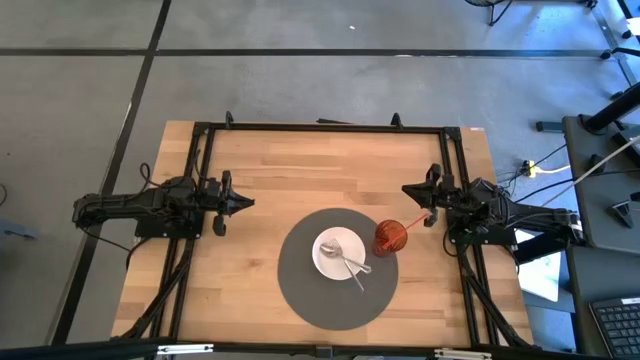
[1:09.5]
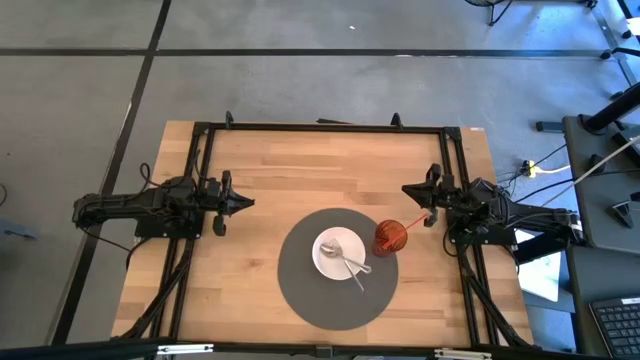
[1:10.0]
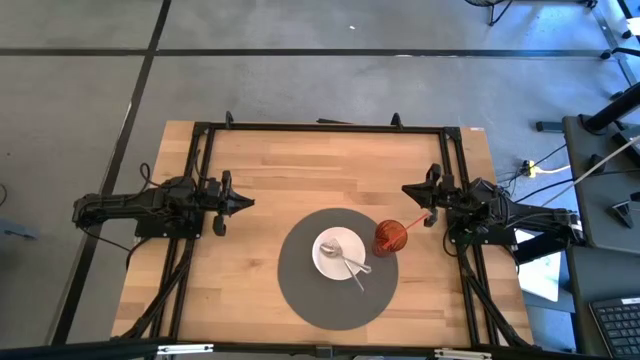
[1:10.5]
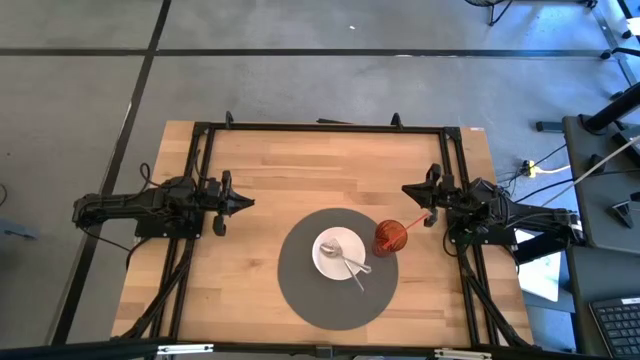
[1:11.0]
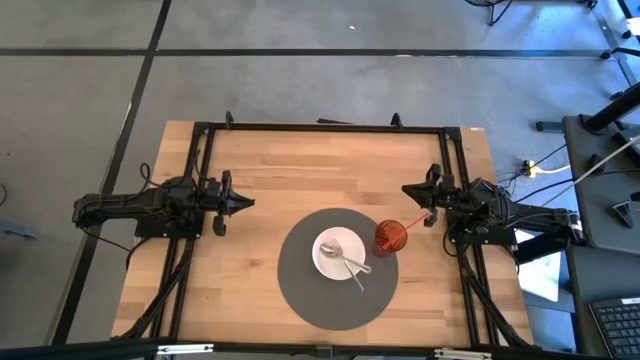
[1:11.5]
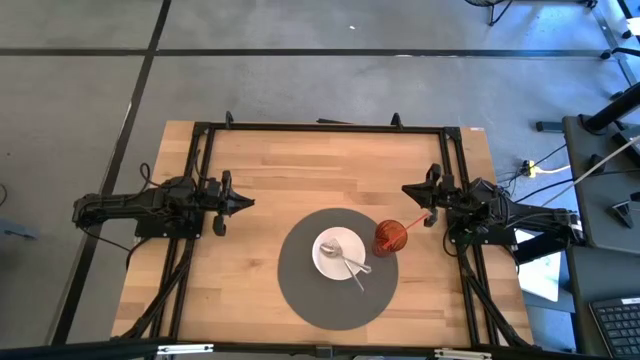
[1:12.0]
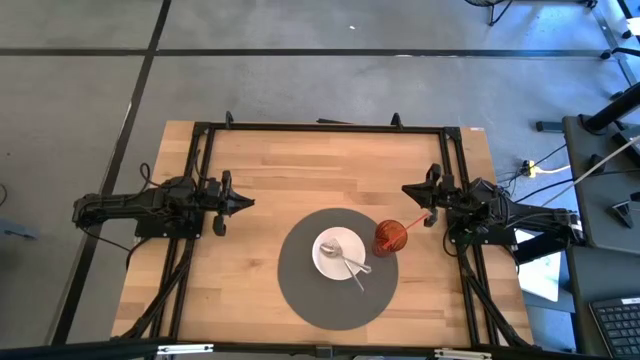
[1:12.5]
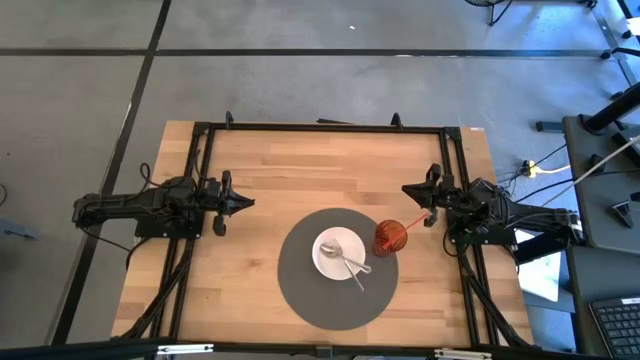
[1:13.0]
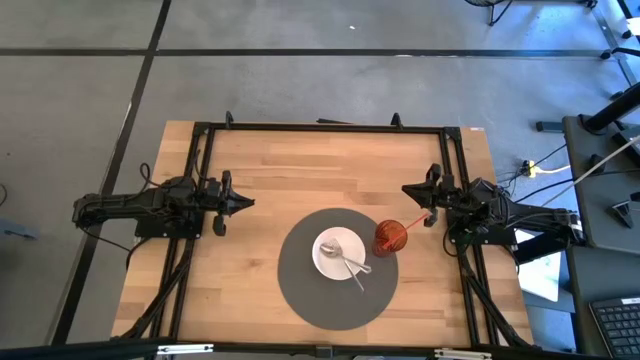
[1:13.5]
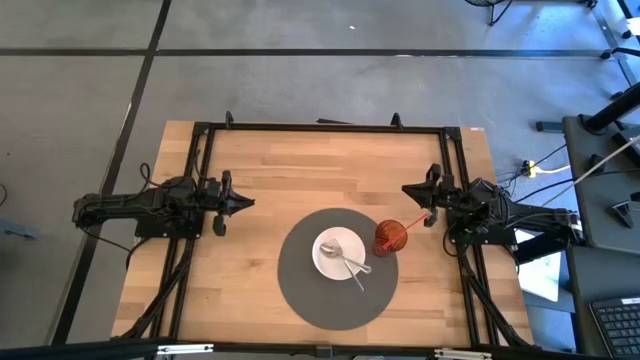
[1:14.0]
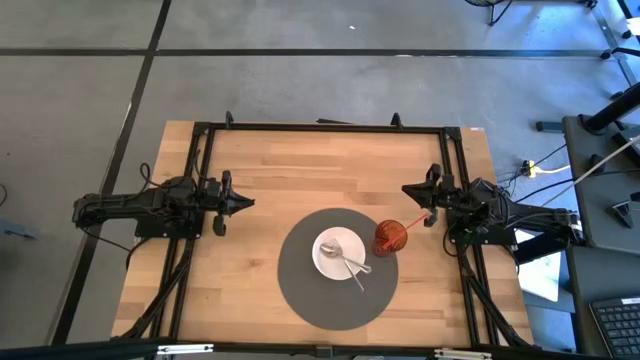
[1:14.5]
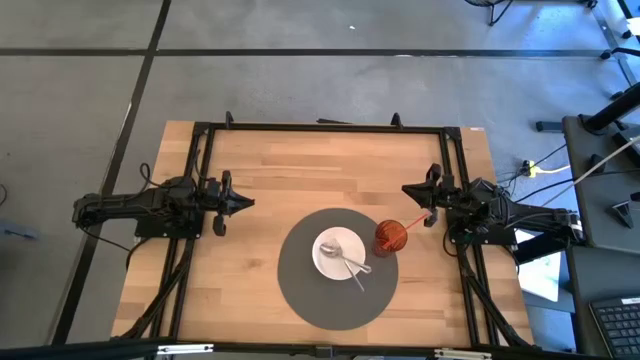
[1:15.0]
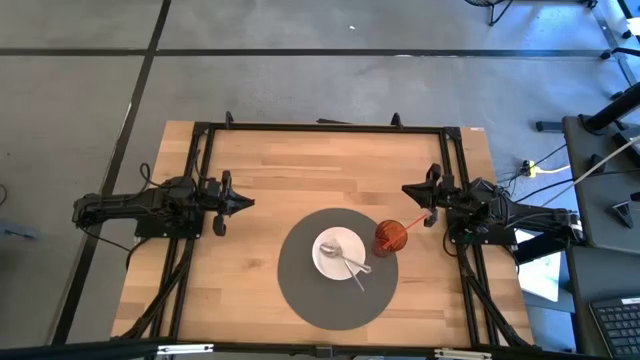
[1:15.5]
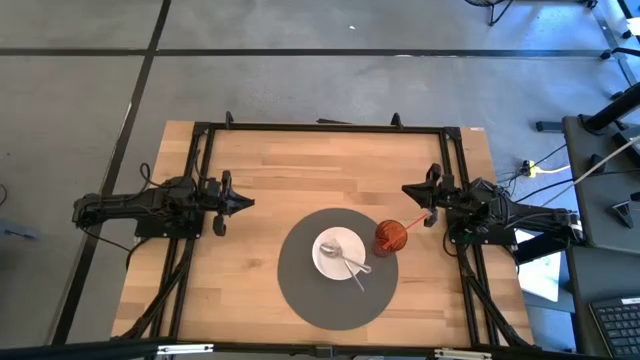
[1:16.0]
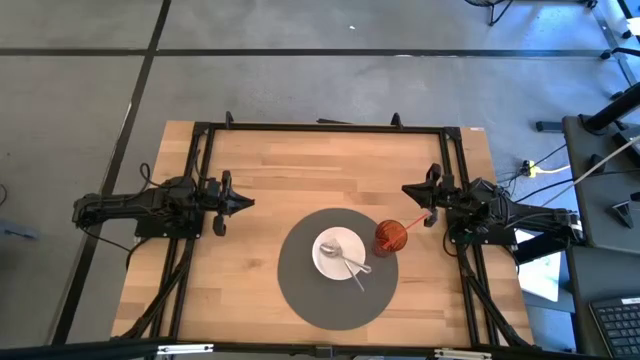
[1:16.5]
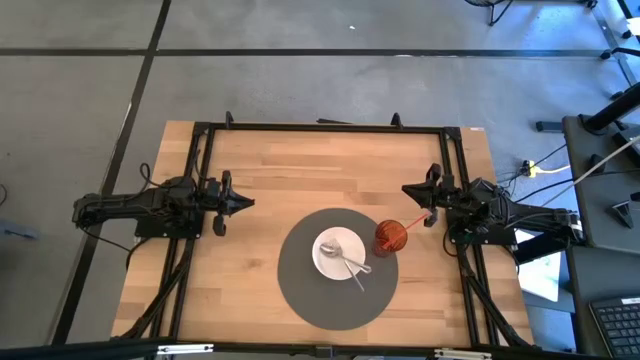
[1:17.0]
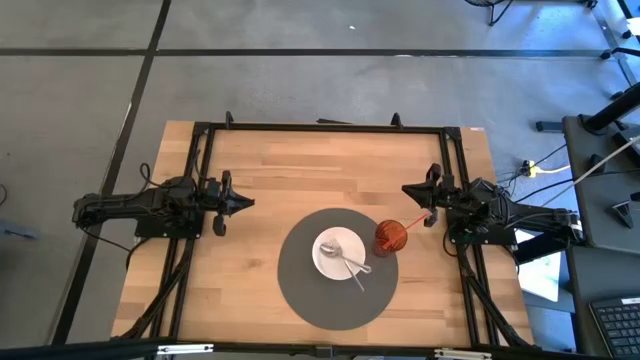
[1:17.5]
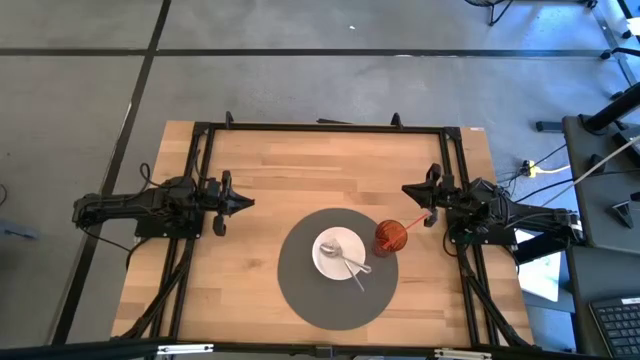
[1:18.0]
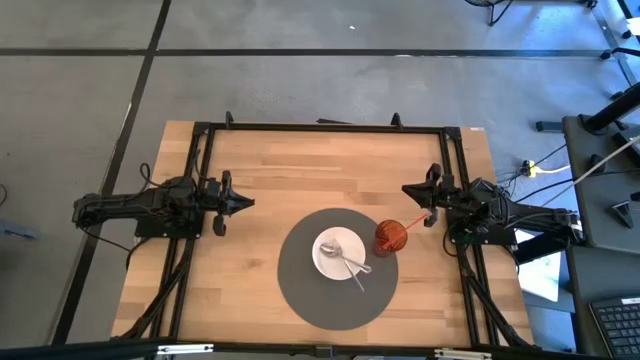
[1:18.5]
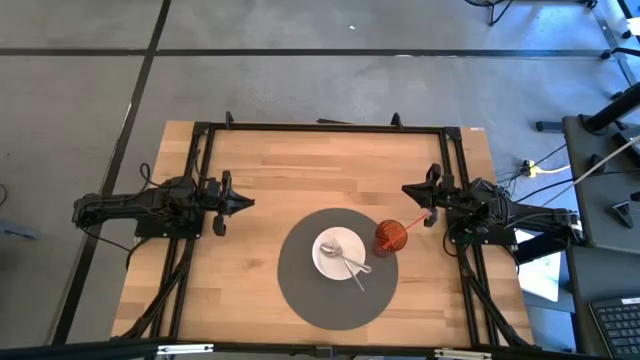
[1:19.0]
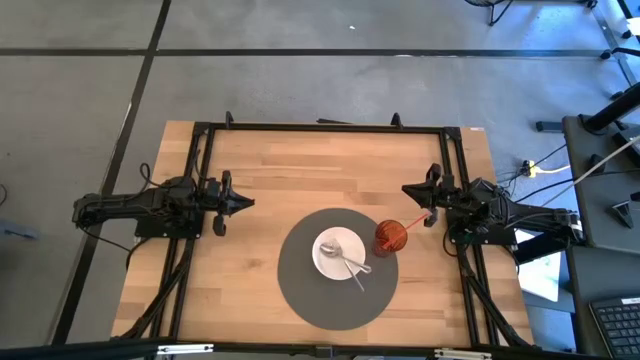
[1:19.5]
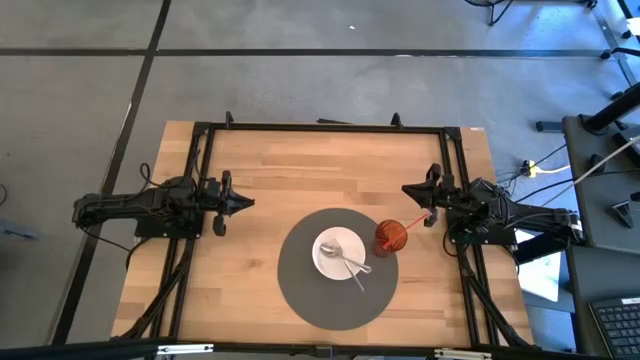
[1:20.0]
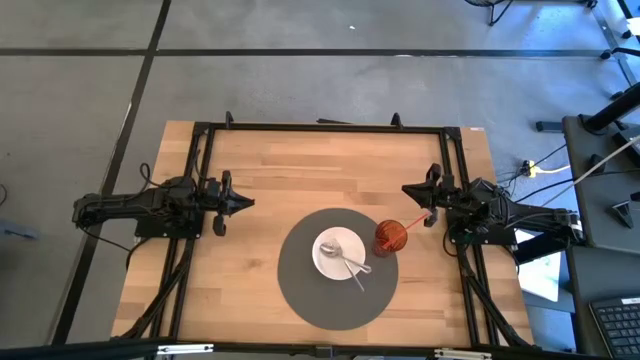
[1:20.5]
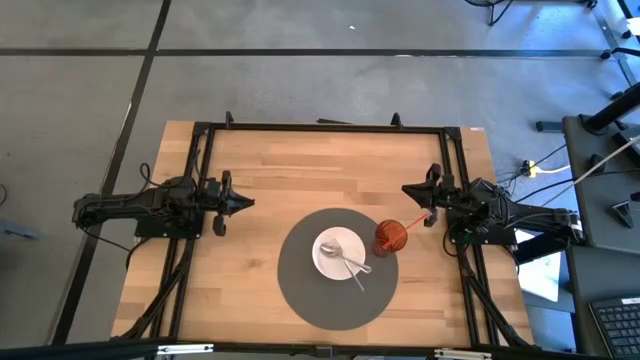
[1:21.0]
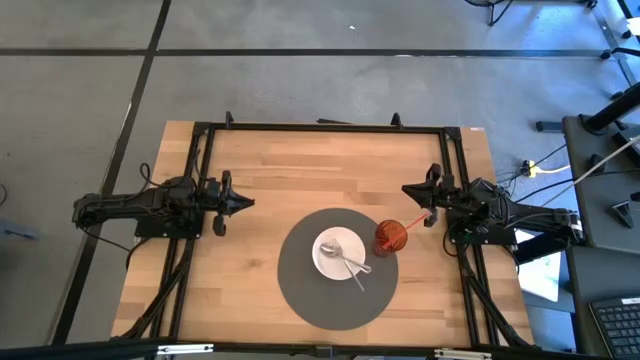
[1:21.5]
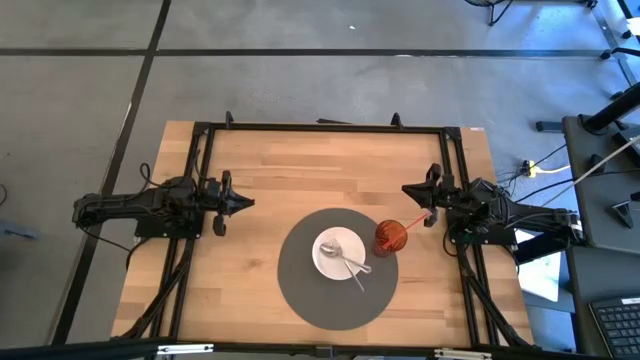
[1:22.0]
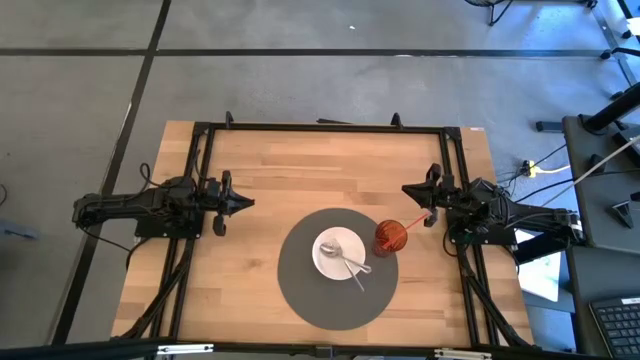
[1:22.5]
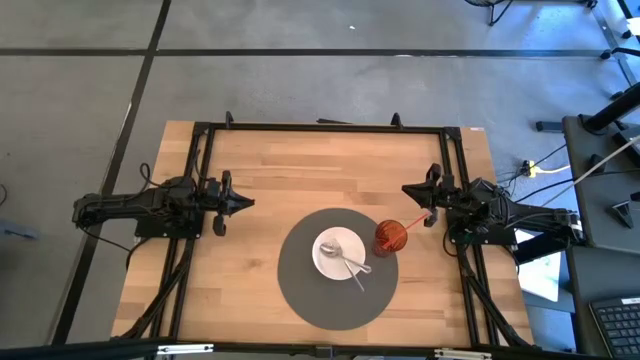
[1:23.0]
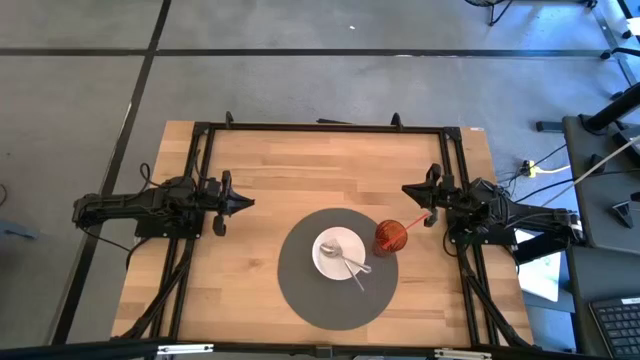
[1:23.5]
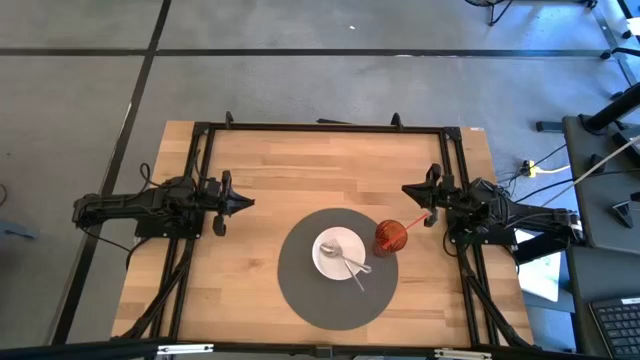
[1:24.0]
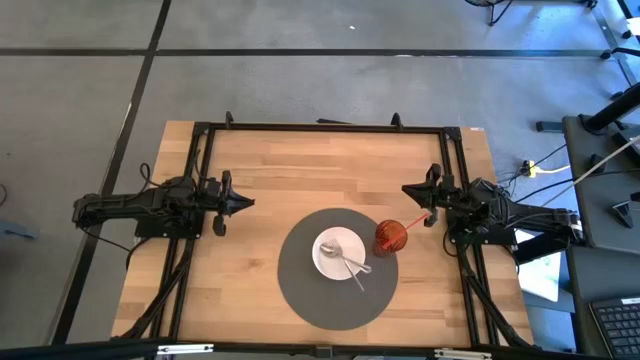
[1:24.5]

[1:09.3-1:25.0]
Task: Pick & Place Utensil
Return to Home Position

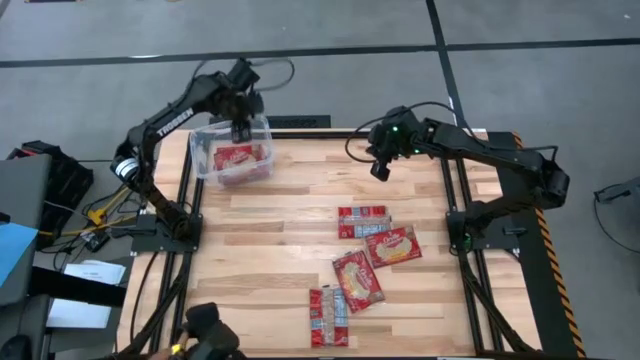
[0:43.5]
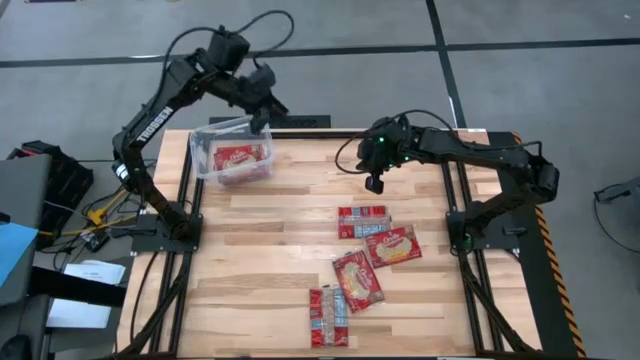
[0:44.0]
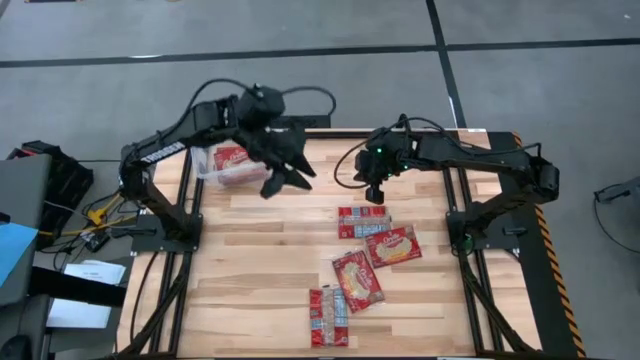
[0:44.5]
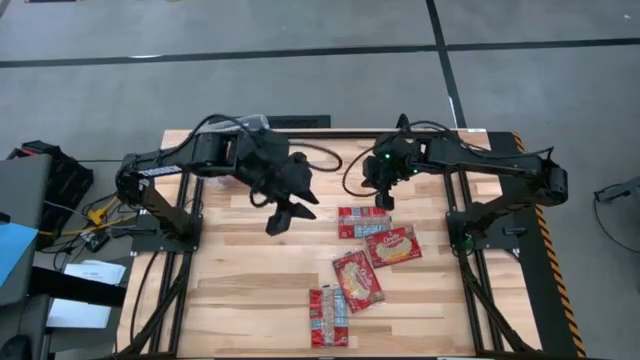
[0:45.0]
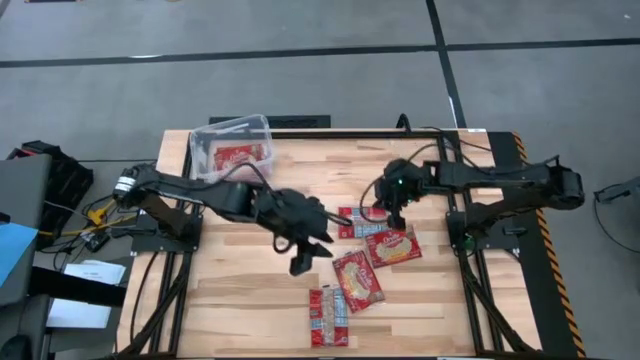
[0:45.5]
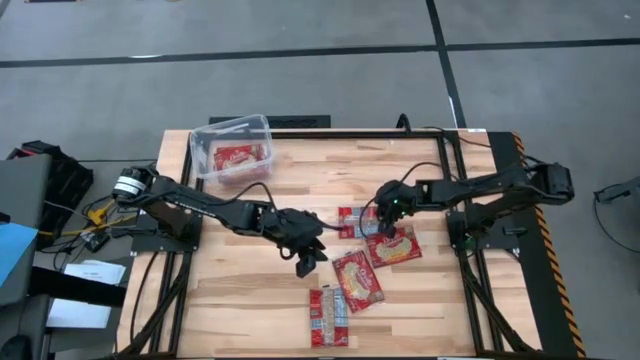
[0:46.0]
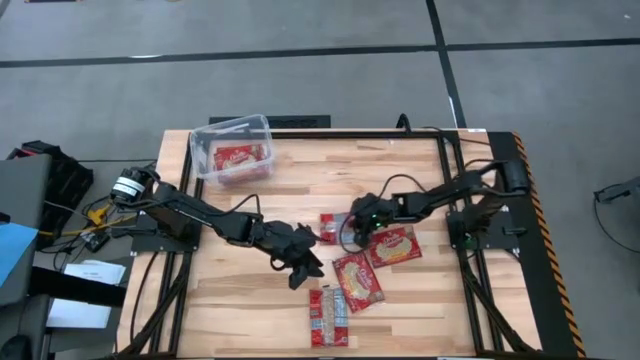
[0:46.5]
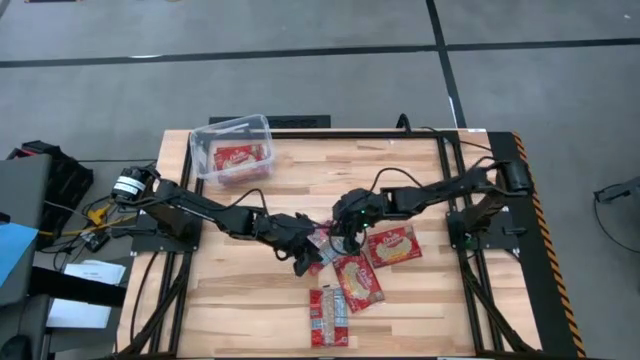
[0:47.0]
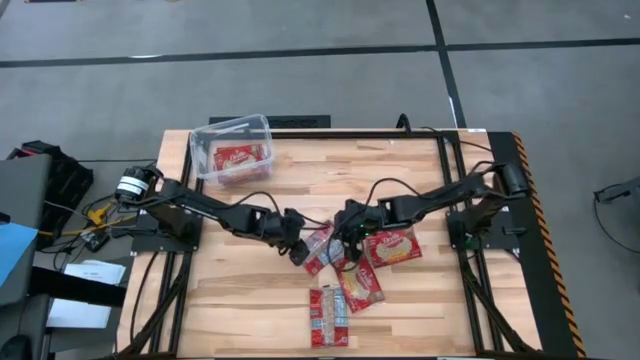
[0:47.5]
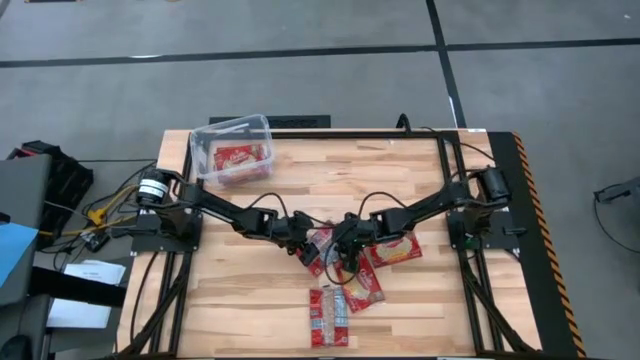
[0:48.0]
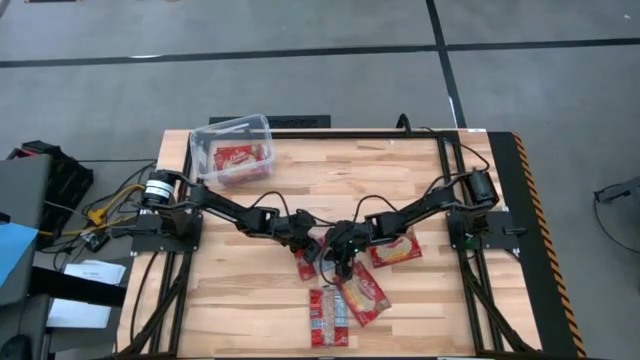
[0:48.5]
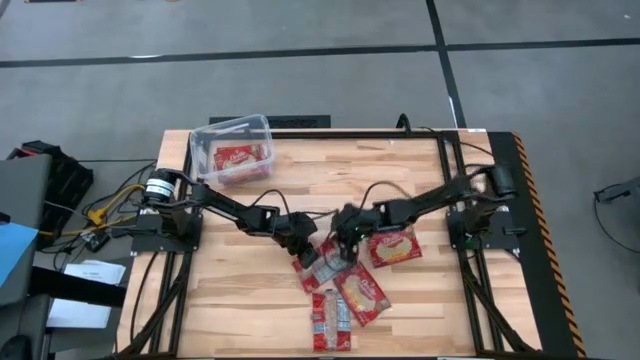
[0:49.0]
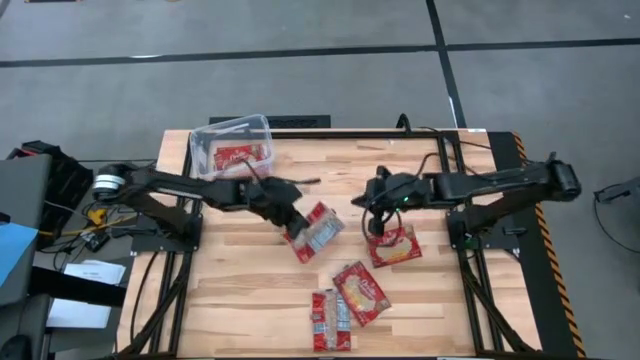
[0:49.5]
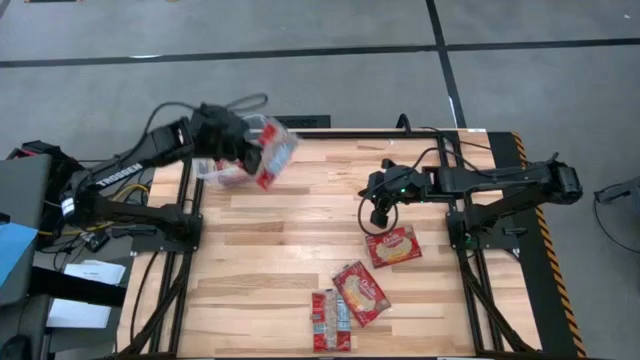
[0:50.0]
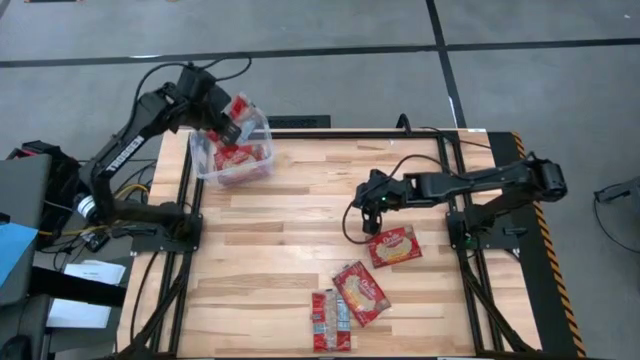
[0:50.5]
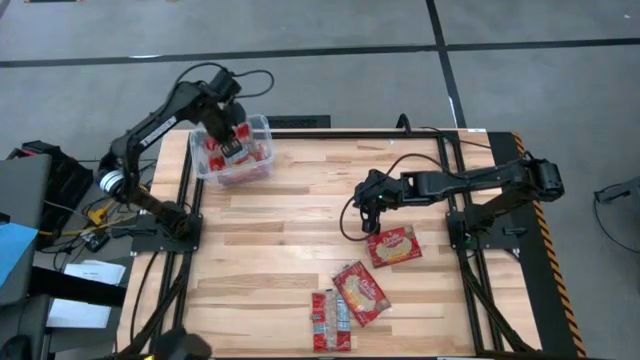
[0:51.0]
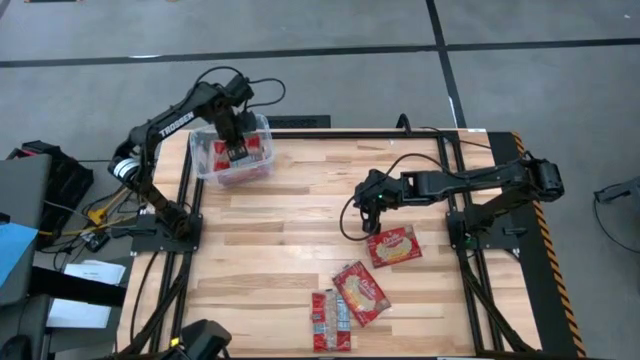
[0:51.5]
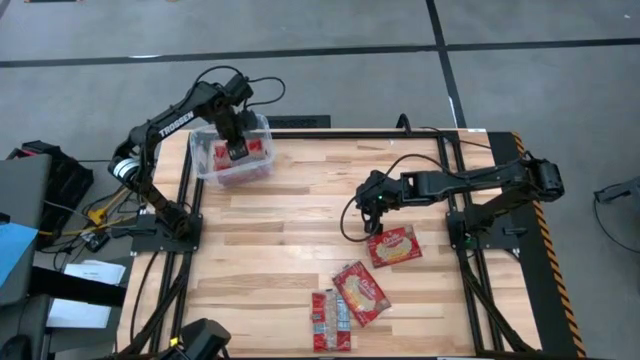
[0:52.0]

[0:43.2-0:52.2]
Task: Sort popcorn bags into baskets
Put the red popcorn bag into the transparent bin
